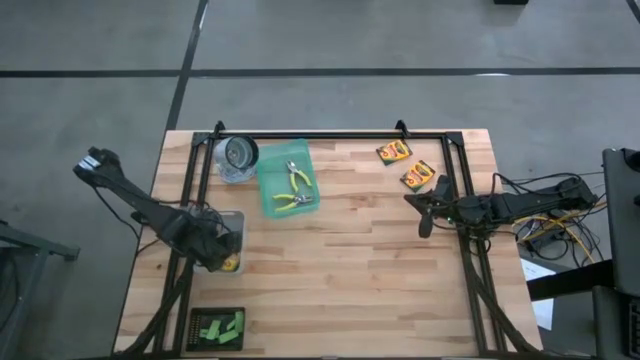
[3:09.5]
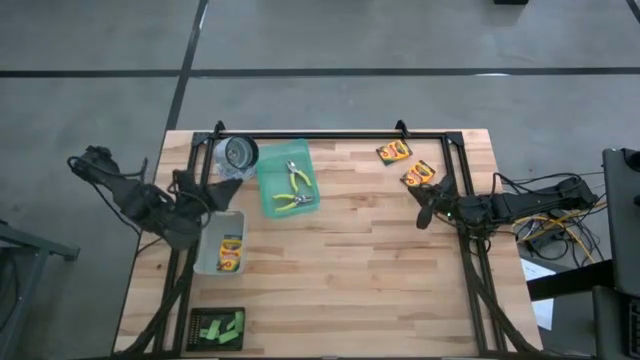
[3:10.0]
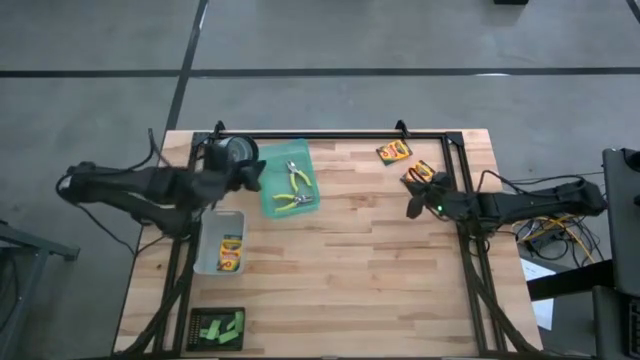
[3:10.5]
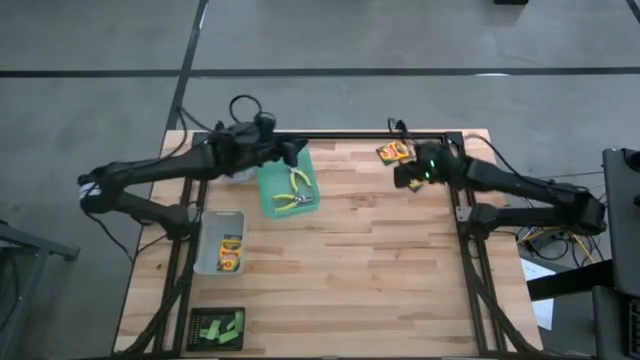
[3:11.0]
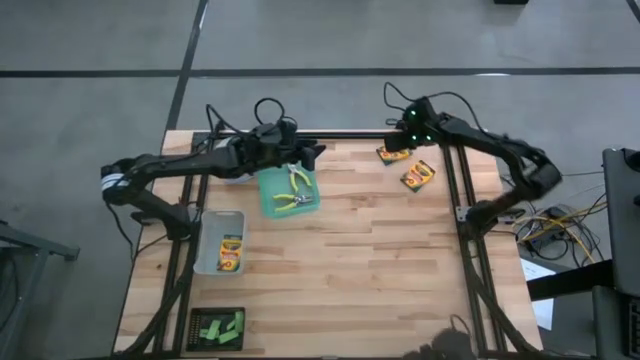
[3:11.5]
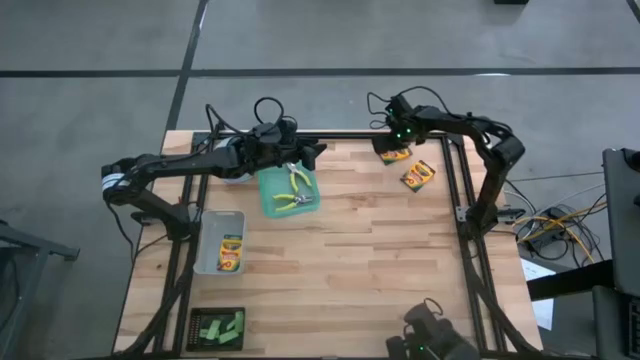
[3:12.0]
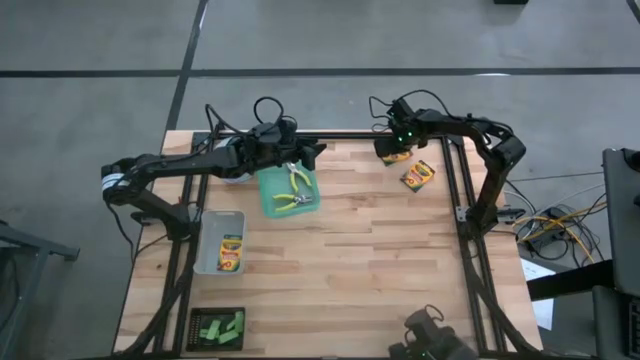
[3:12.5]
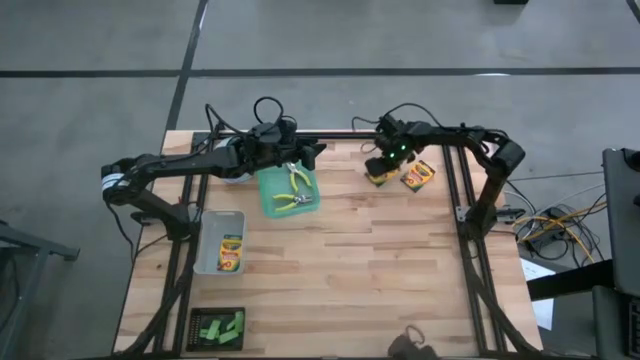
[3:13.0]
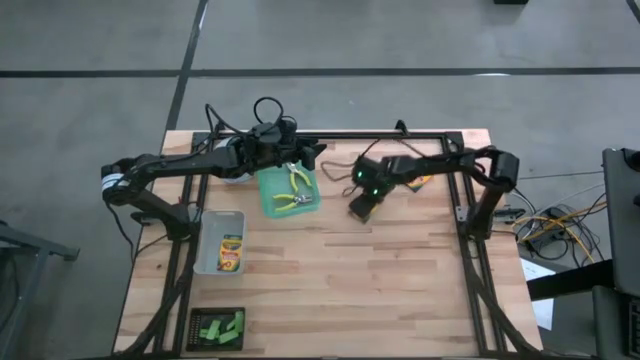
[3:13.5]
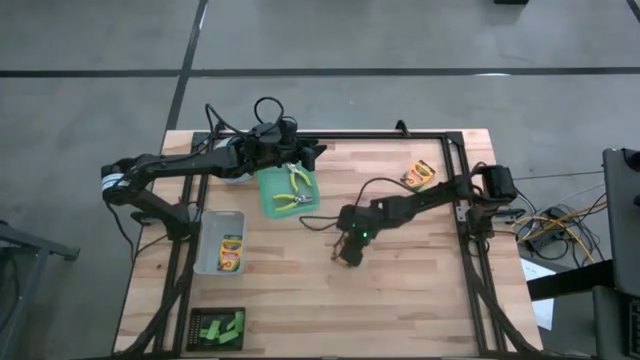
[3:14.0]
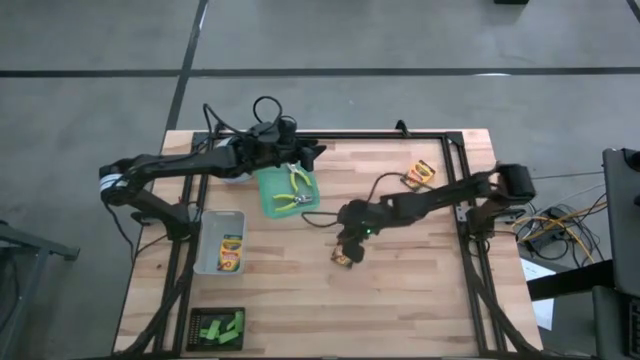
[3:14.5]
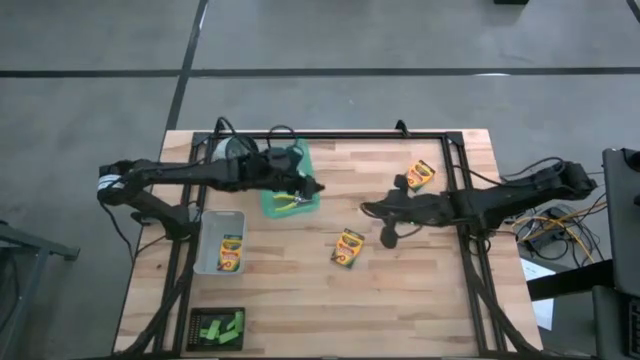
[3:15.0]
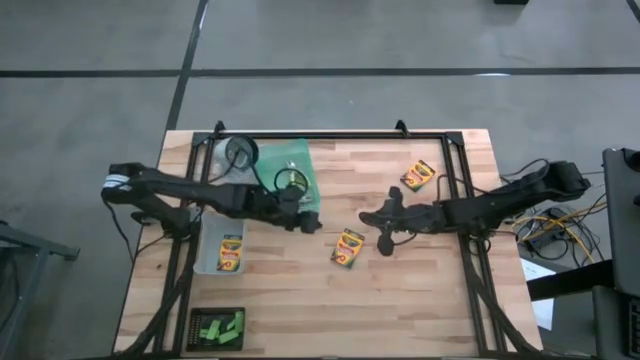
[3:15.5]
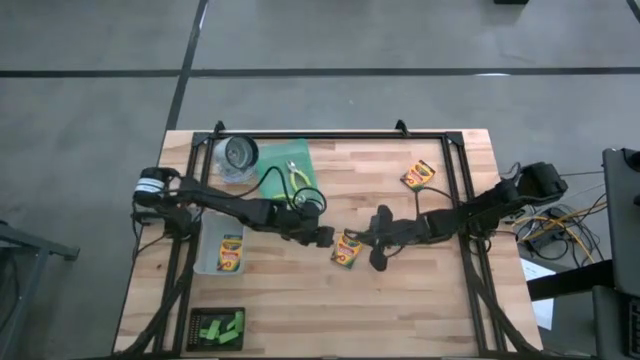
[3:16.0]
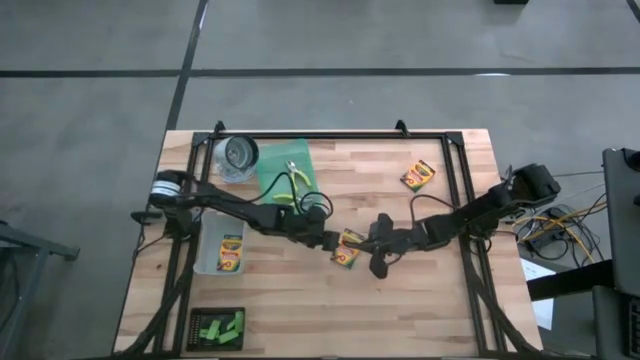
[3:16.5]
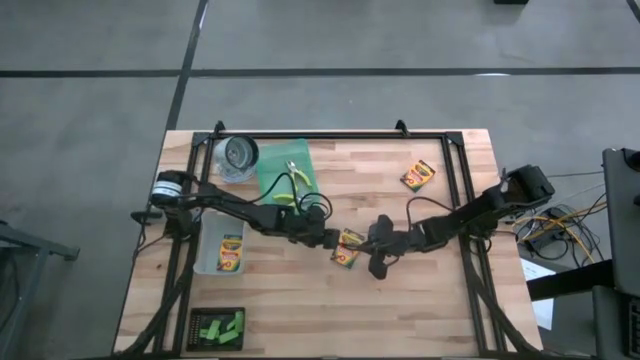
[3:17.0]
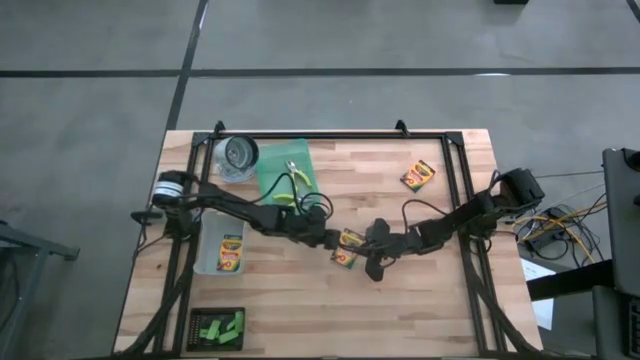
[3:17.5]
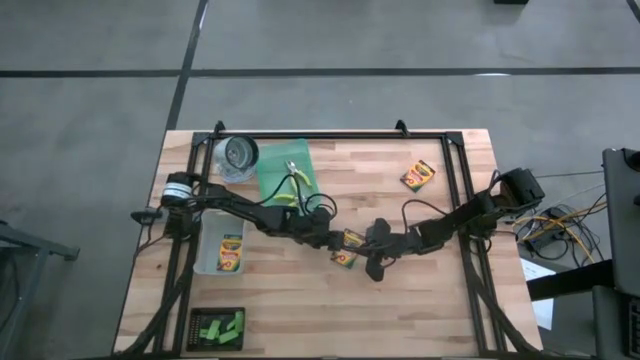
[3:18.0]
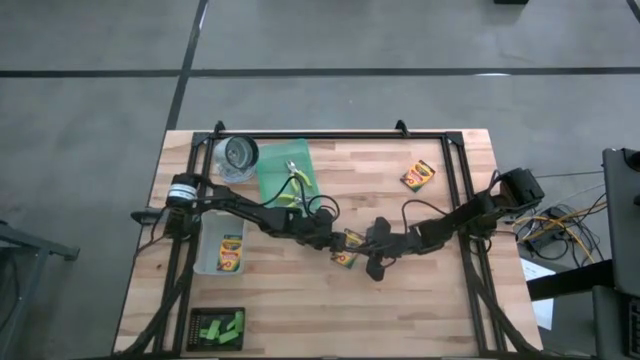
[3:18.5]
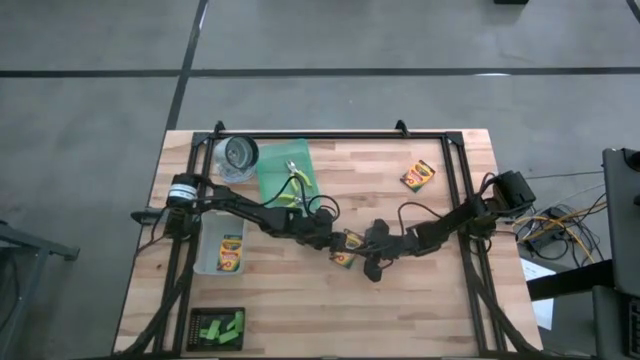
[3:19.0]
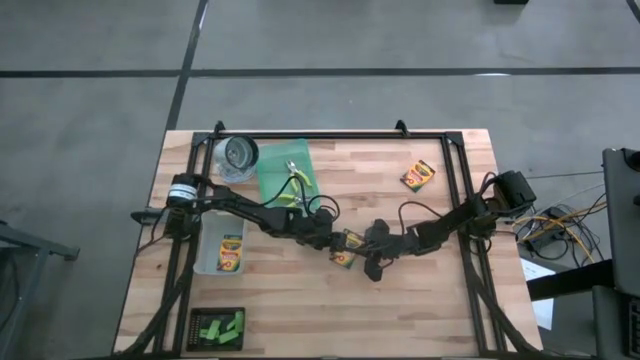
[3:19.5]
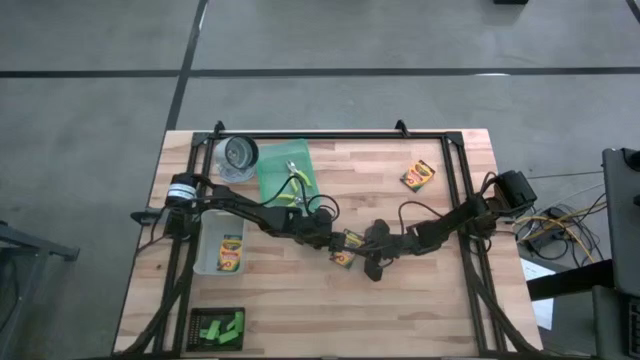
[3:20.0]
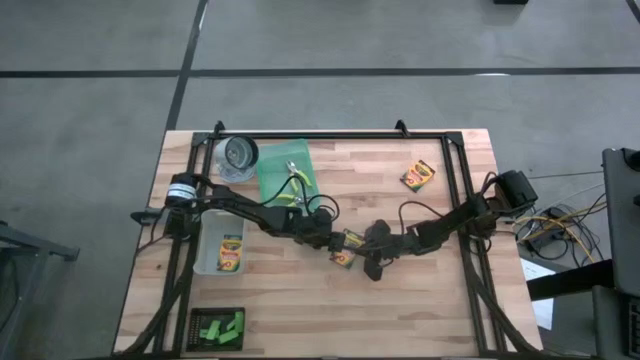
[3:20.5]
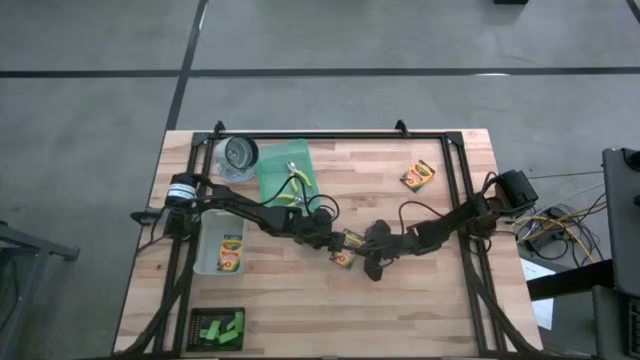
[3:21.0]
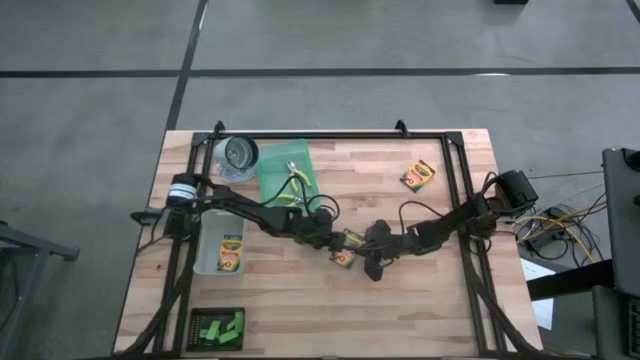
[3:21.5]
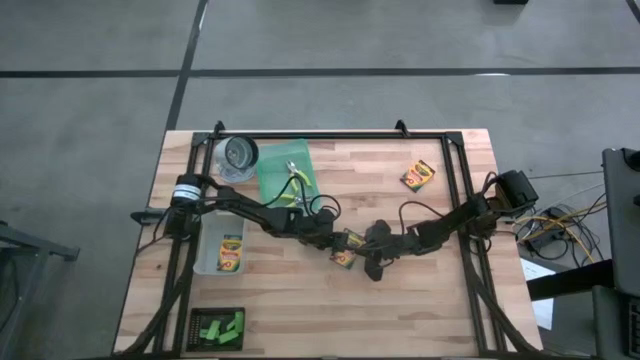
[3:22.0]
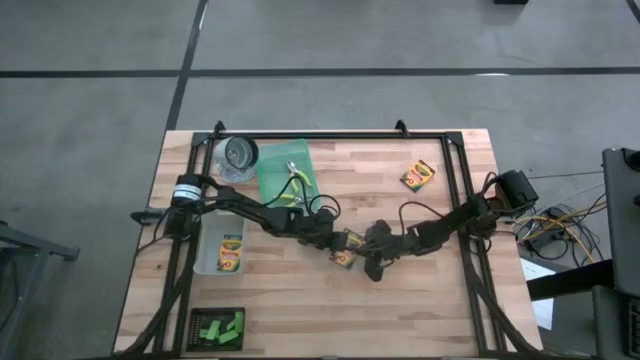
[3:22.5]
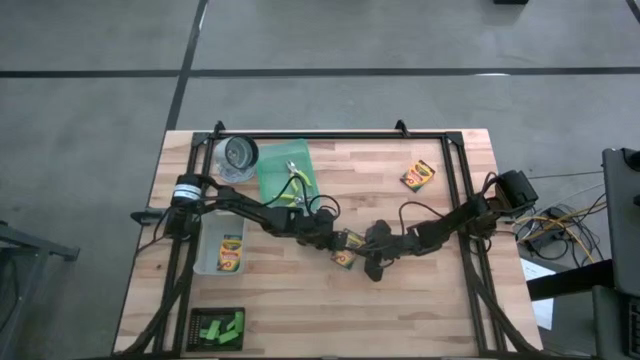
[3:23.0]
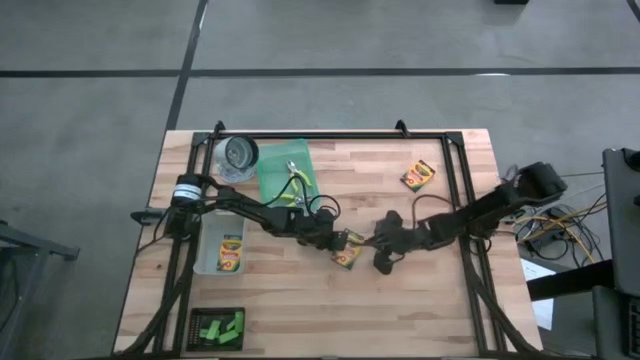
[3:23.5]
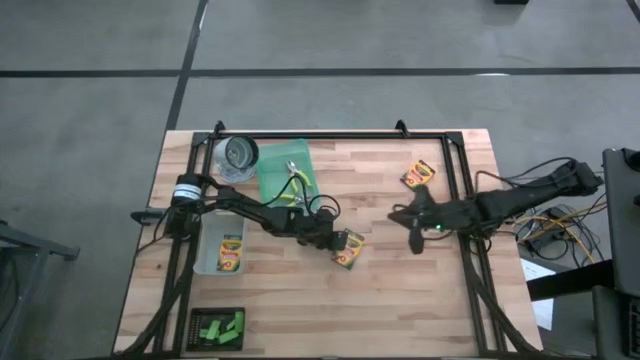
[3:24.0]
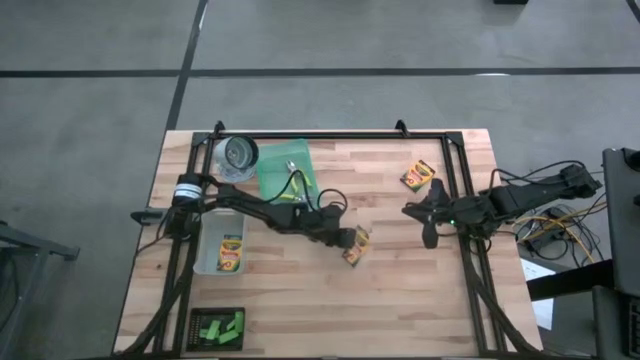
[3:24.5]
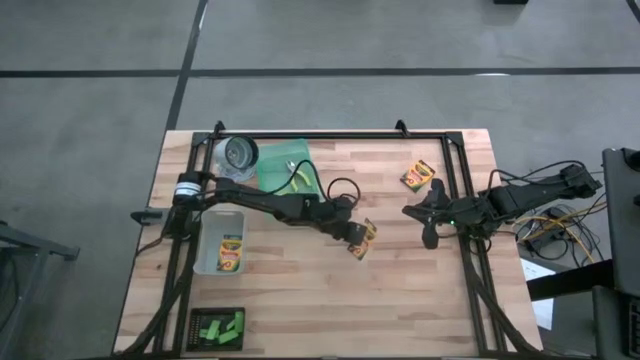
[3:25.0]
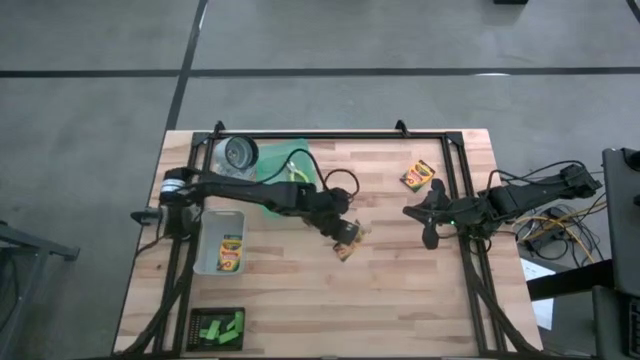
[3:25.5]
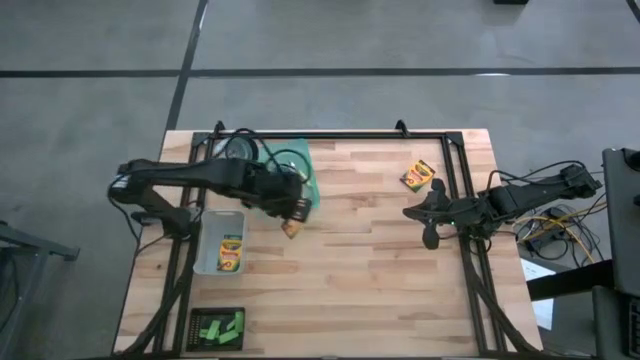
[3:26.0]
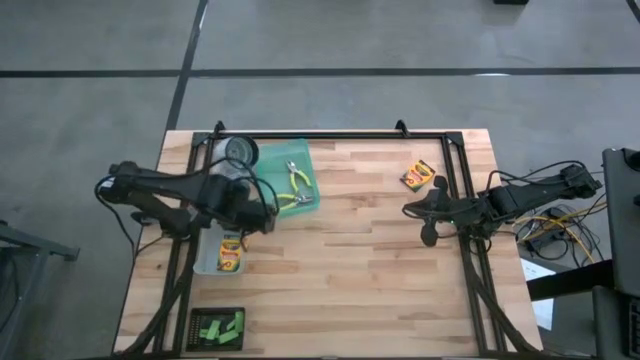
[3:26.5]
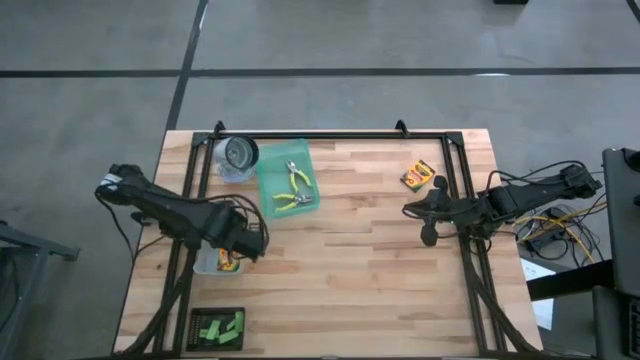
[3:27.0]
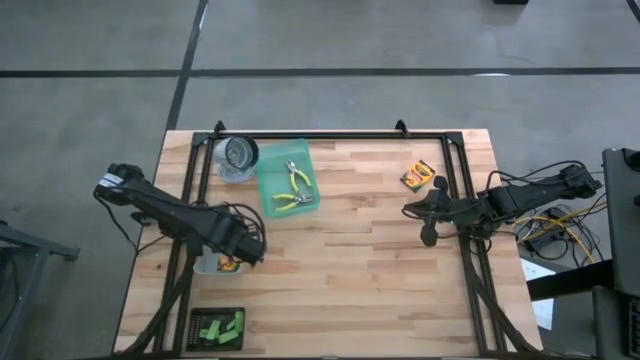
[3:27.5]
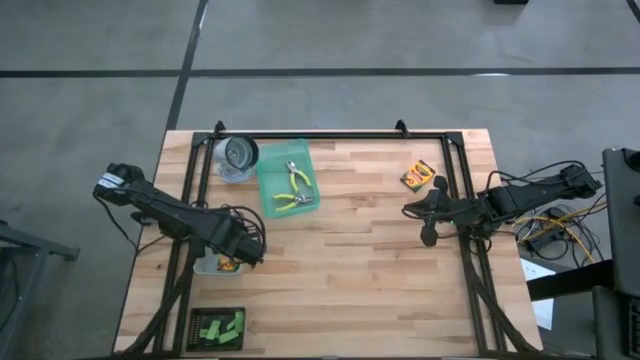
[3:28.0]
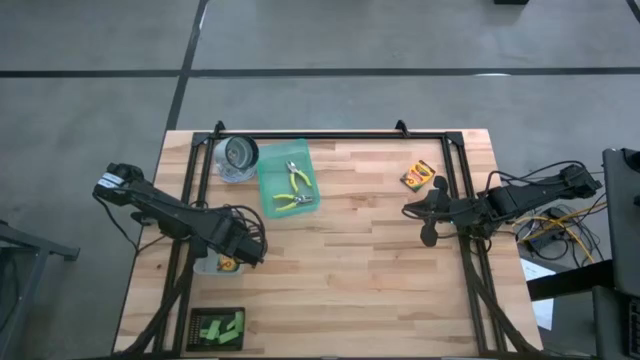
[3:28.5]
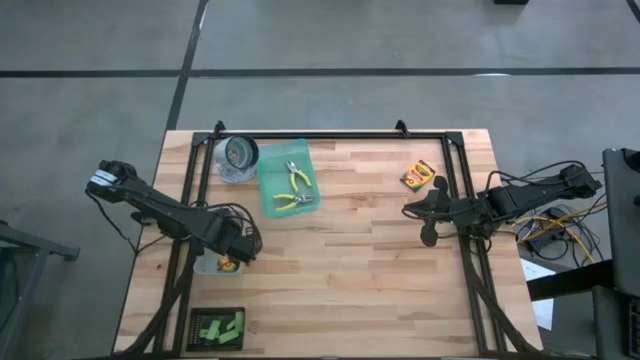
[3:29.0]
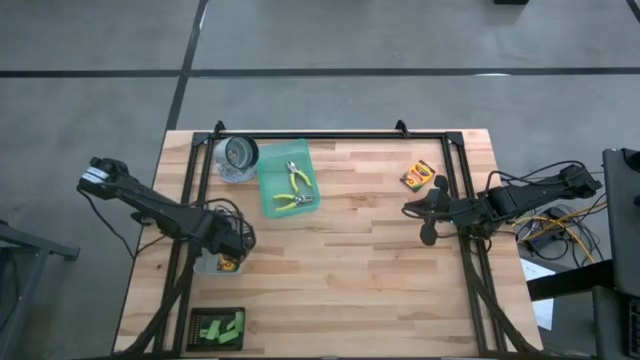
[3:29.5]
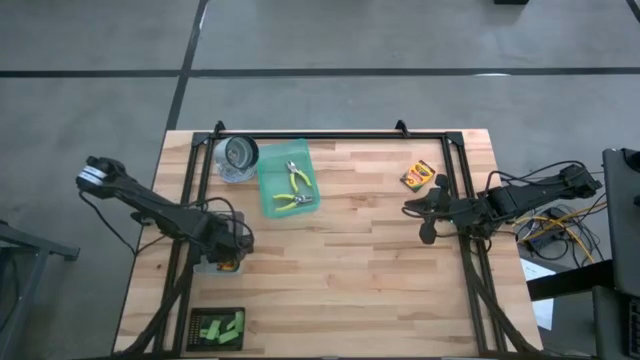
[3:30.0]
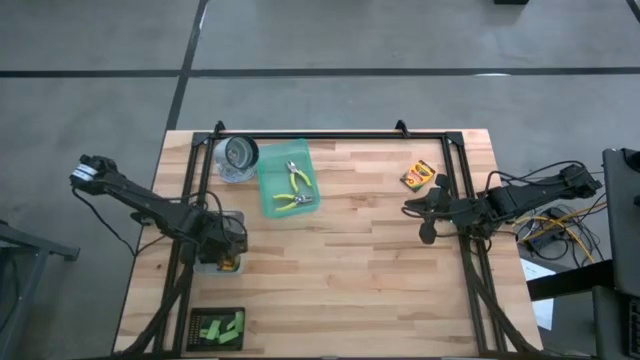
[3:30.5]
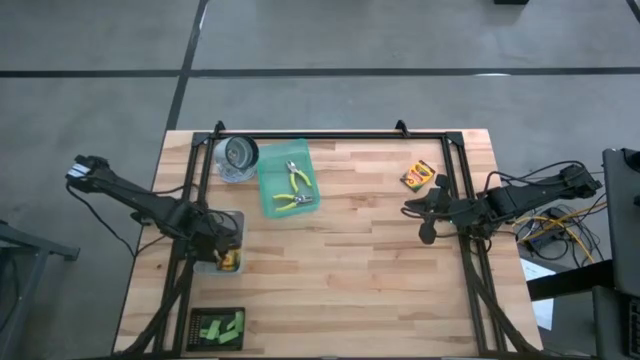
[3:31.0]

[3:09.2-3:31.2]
Task: Pick & Place School Supplies
Put the yellow crayon box into the gray bin
